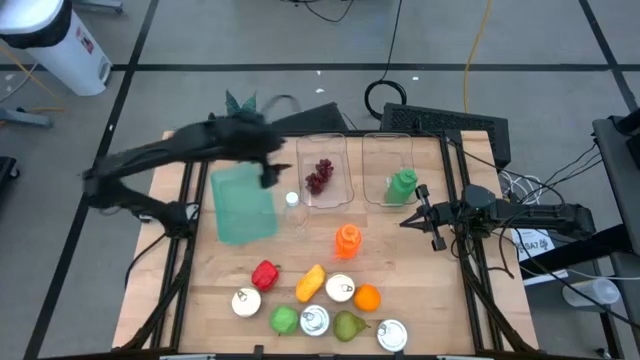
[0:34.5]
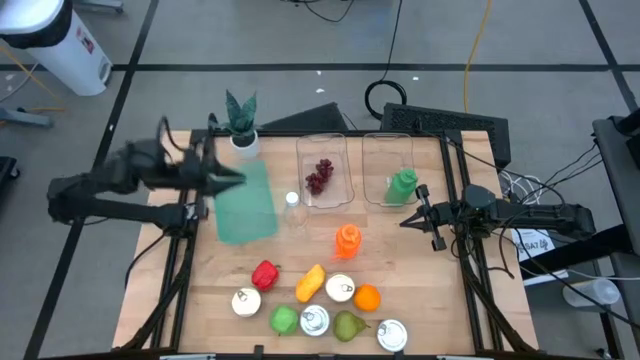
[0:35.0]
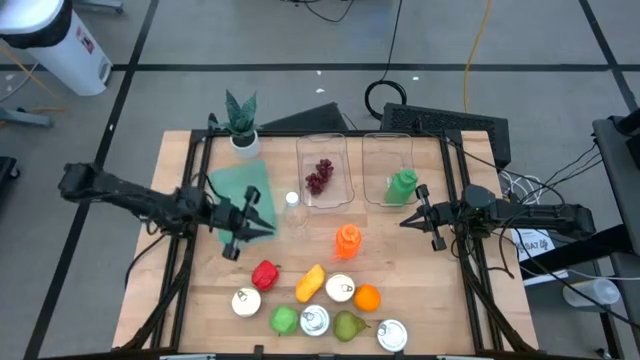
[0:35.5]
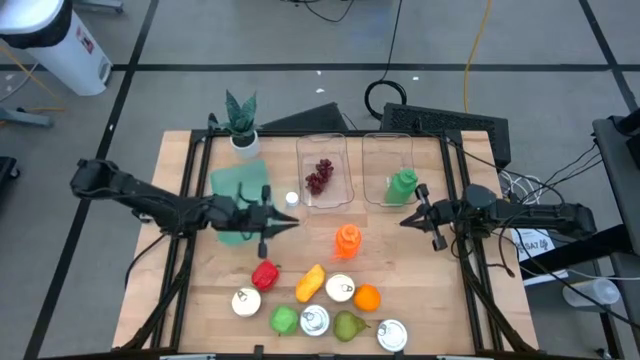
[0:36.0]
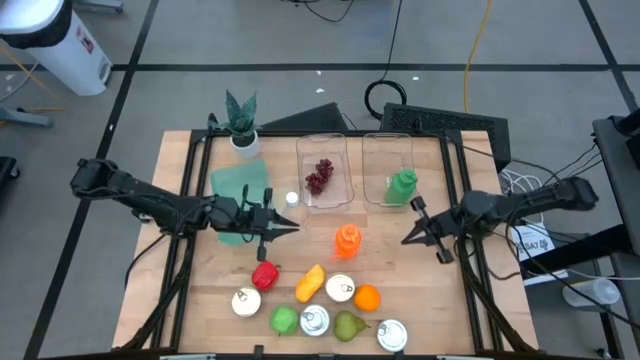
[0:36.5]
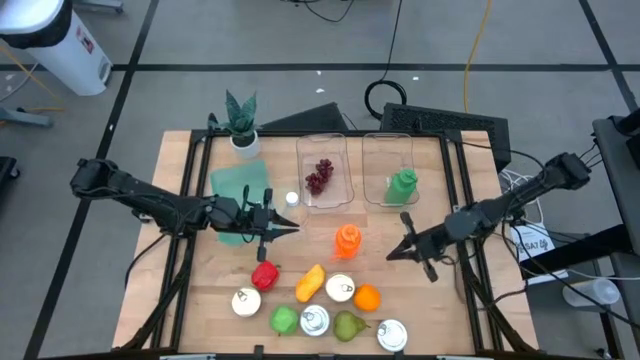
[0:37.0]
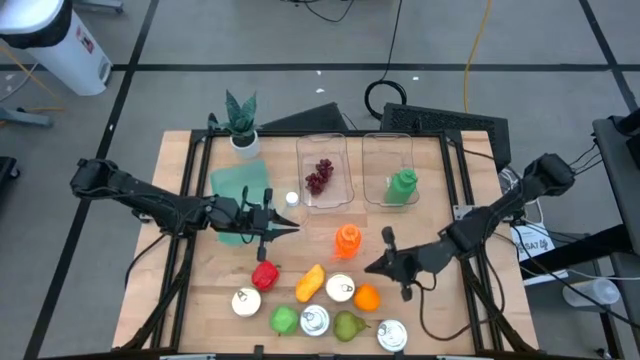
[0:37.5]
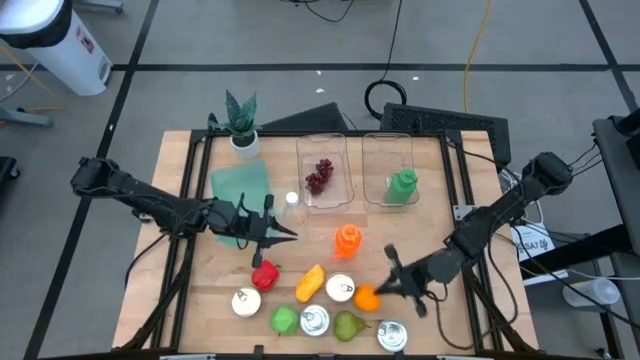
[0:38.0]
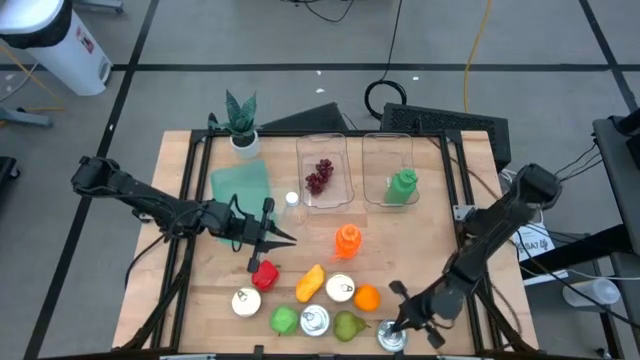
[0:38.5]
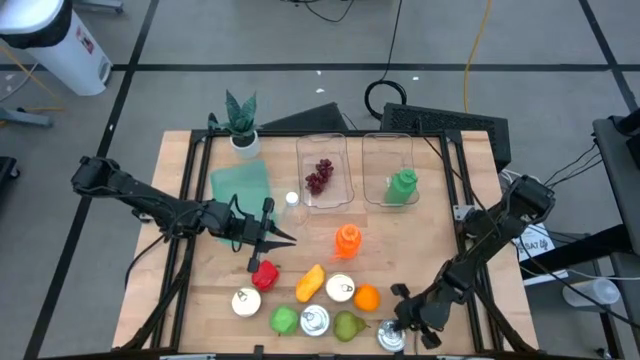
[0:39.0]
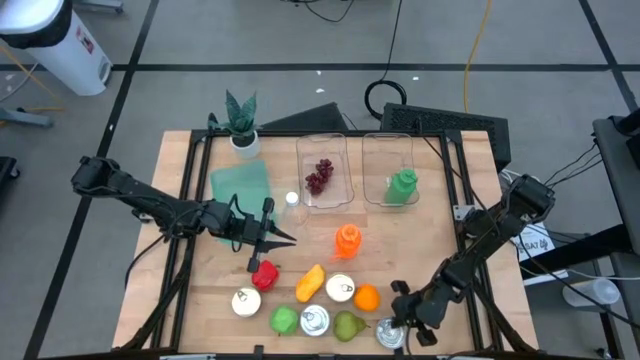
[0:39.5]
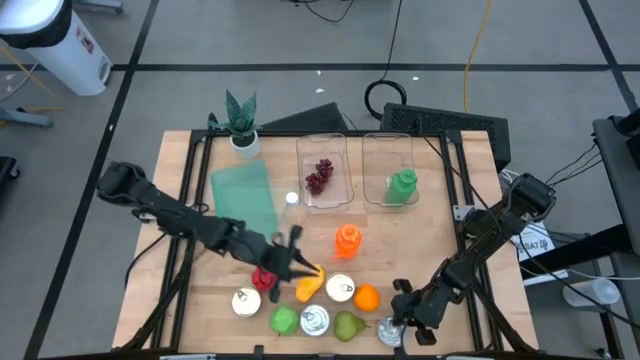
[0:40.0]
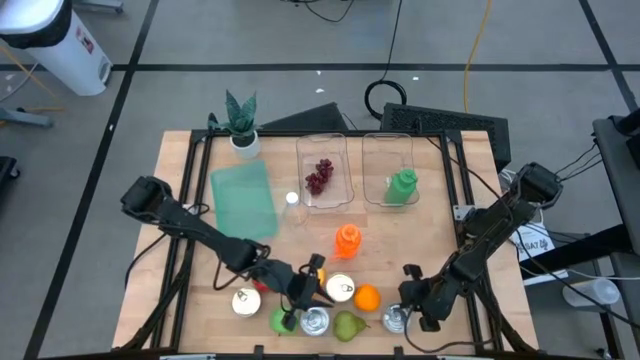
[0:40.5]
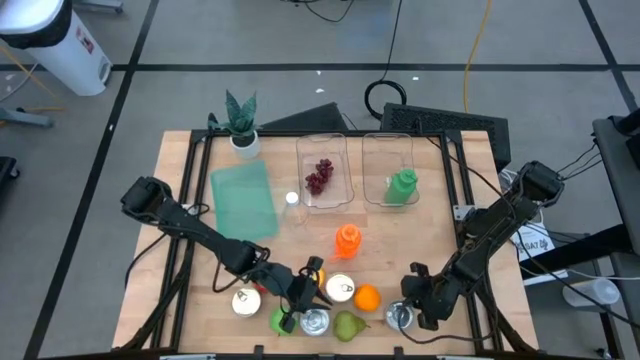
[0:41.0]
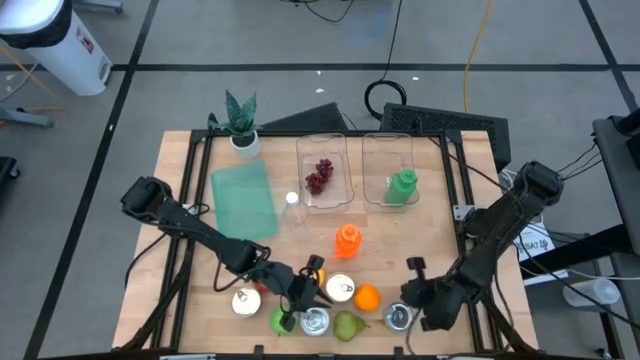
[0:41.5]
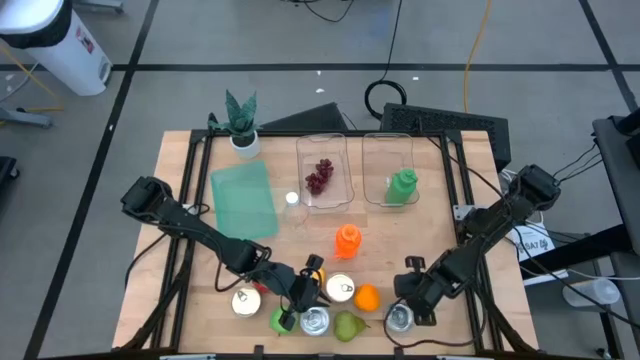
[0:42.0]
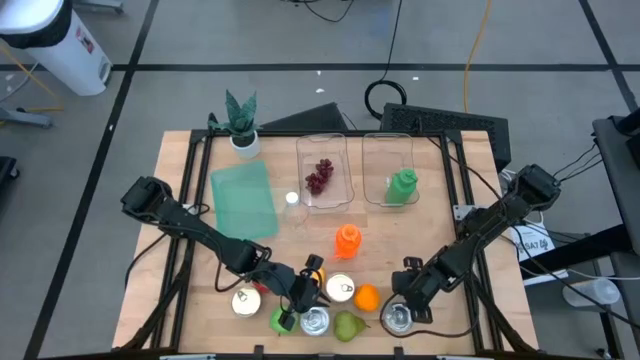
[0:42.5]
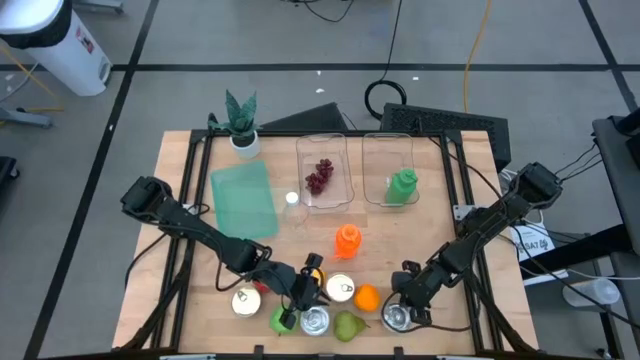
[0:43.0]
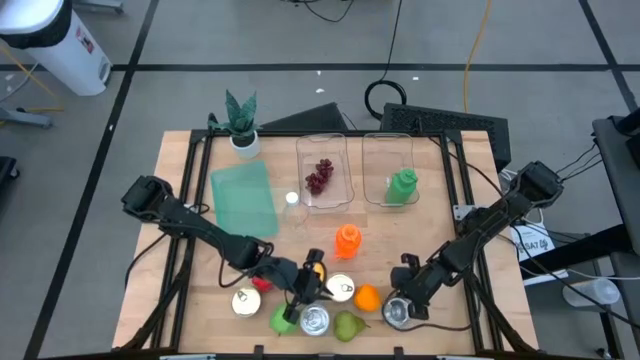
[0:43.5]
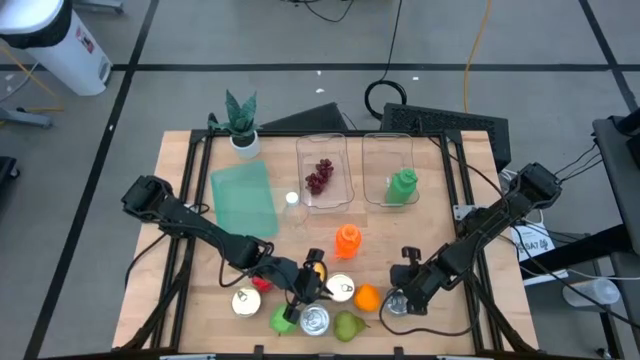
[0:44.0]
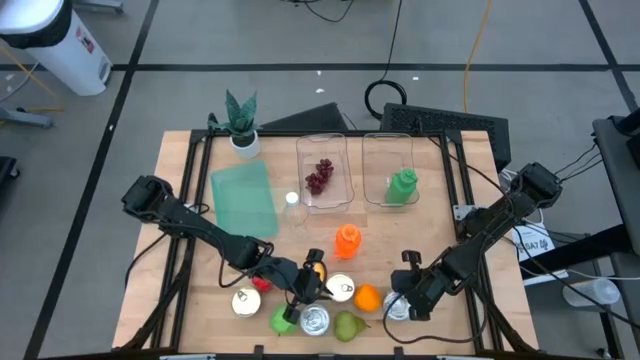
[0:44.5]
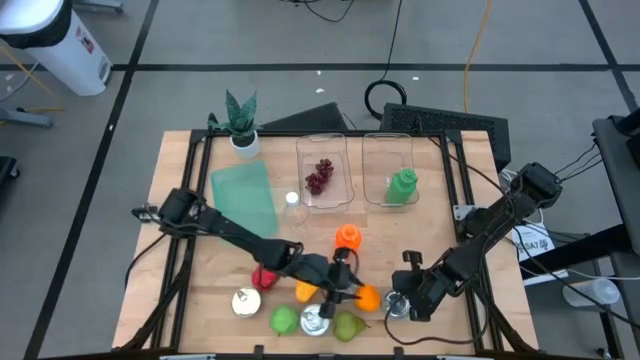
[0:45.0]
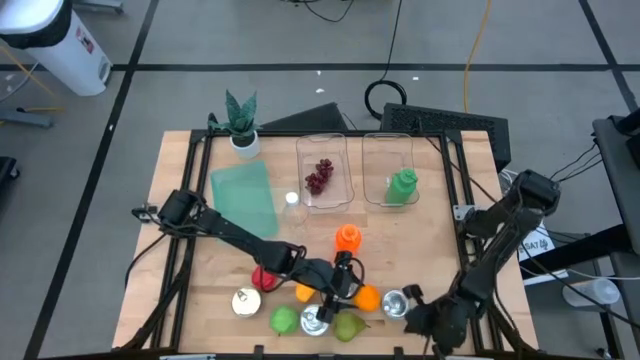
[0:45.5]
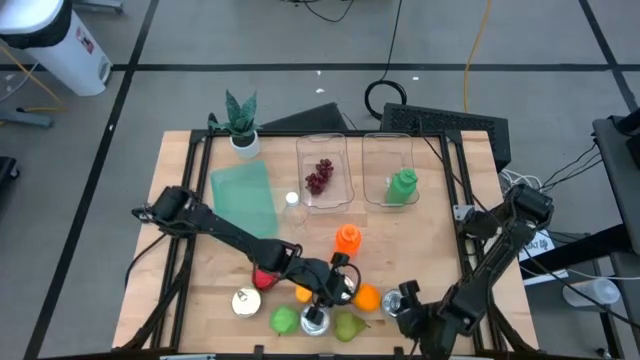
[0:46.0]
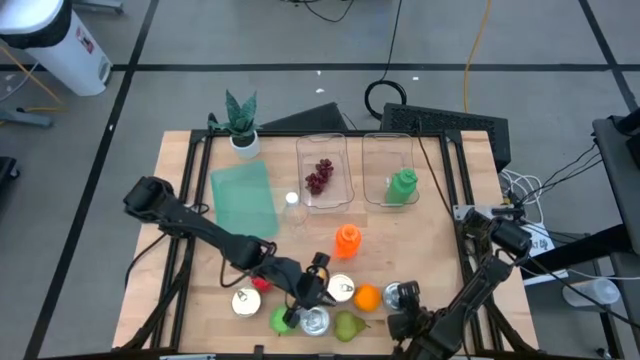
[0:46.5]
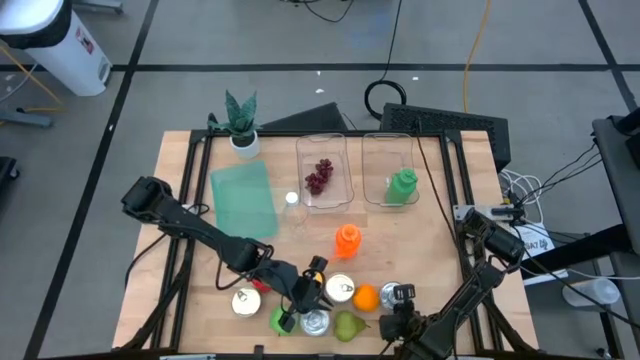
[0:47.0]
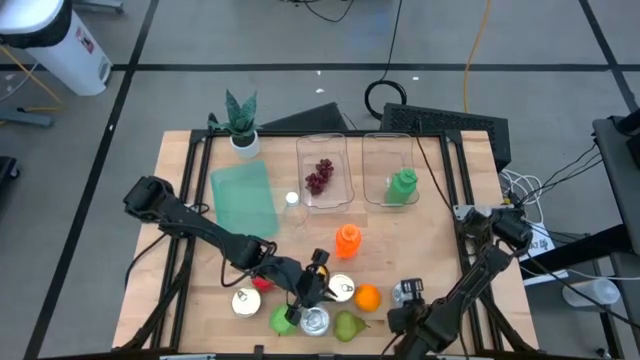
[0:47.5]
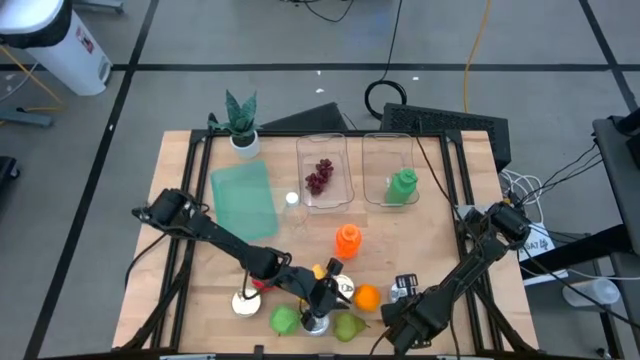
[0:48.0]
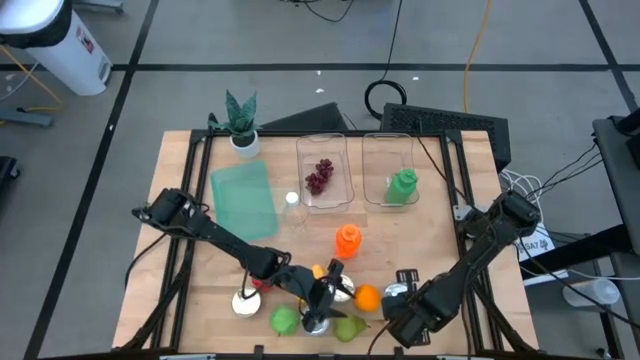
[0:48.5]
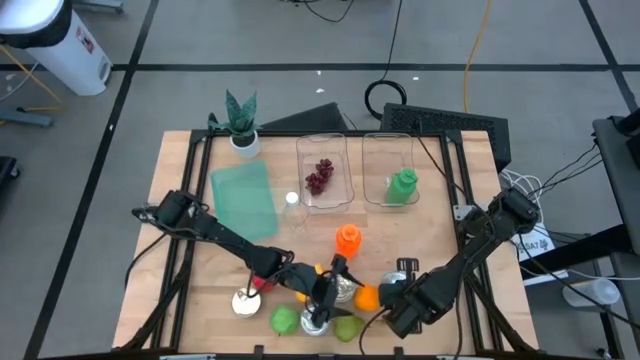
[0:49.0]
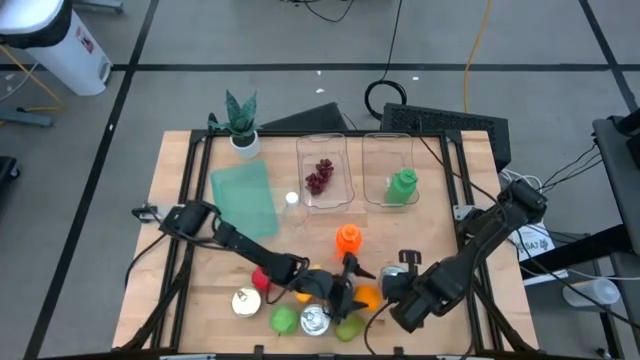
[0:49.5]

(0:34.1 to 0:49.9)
Task: Pick & Place Food Item
Put the right green tuna can into the blue bin

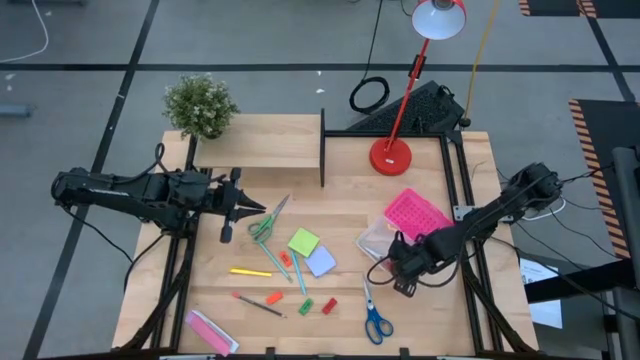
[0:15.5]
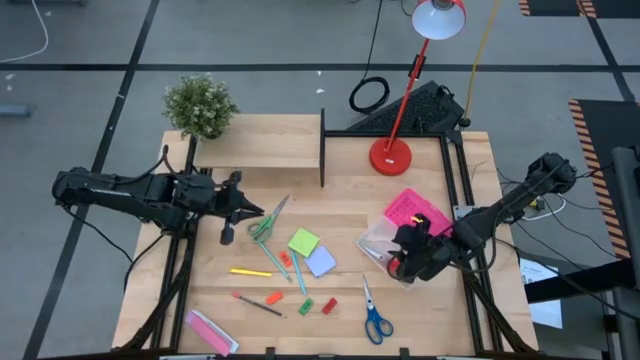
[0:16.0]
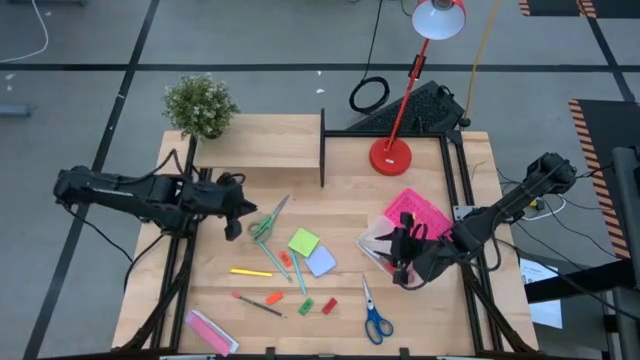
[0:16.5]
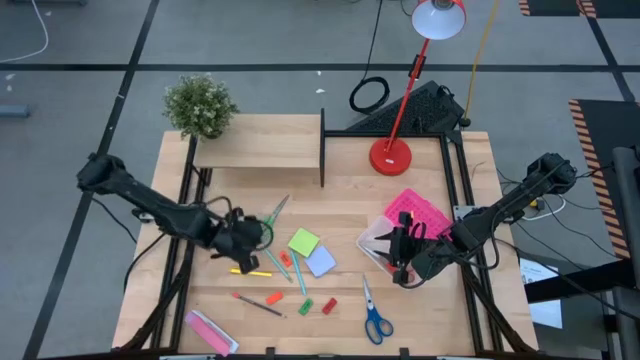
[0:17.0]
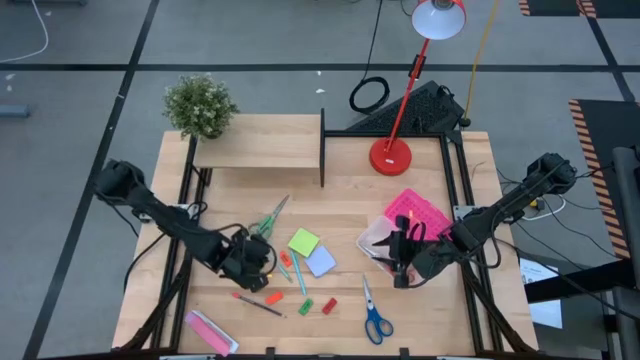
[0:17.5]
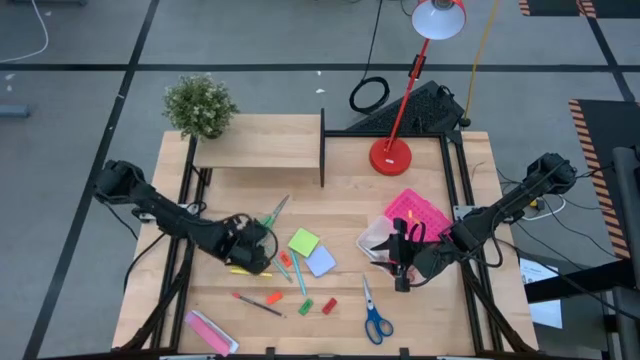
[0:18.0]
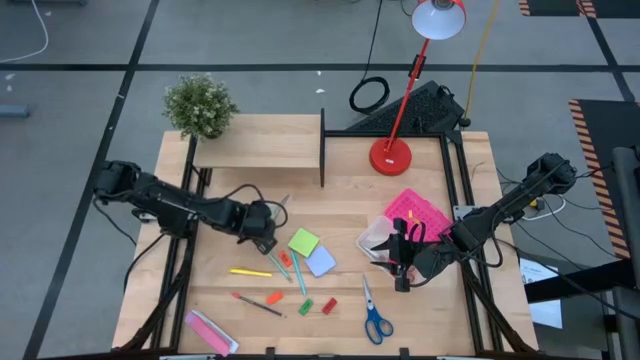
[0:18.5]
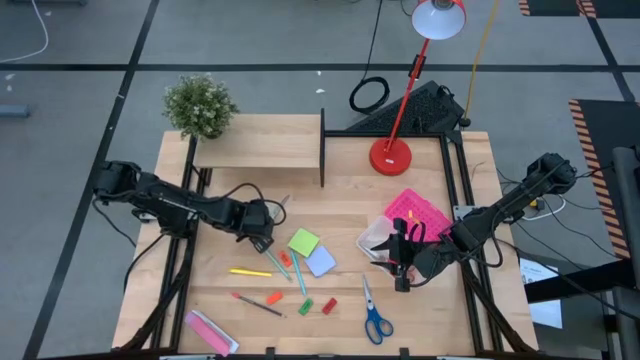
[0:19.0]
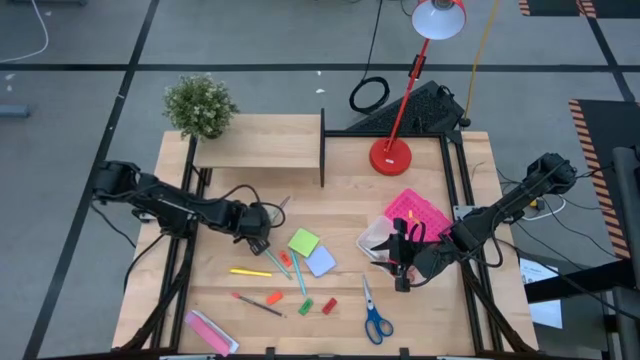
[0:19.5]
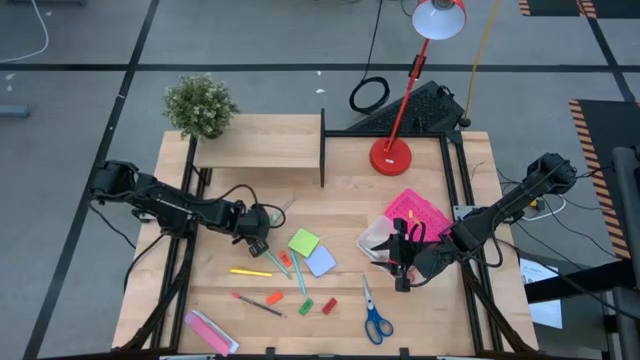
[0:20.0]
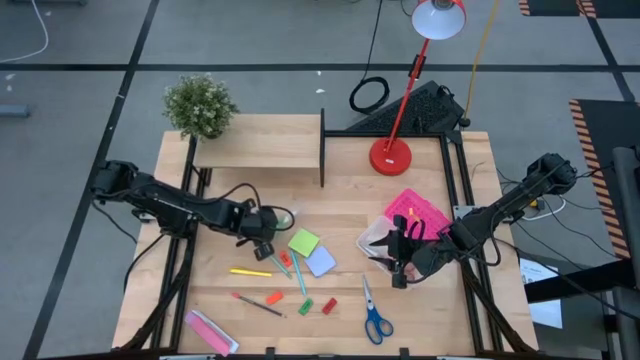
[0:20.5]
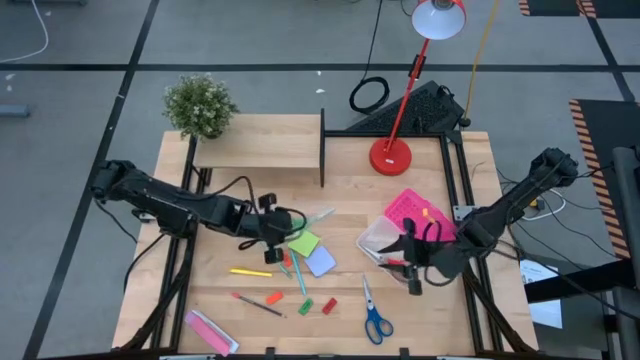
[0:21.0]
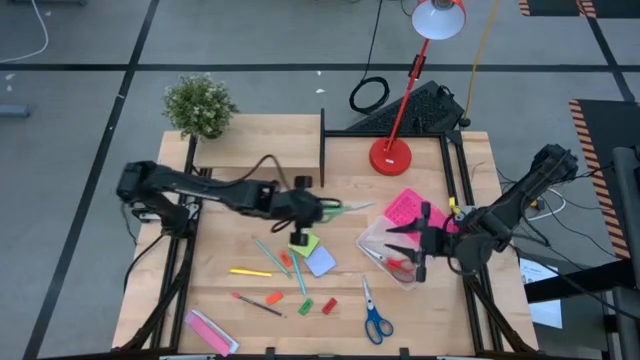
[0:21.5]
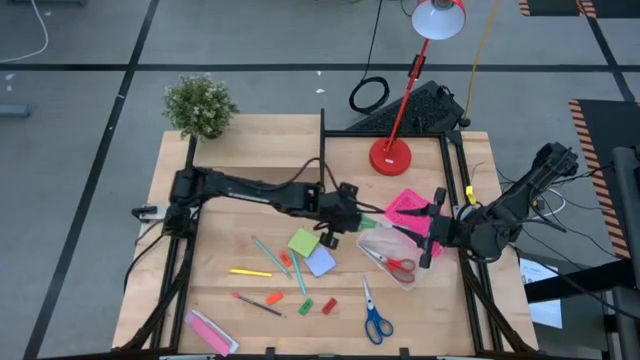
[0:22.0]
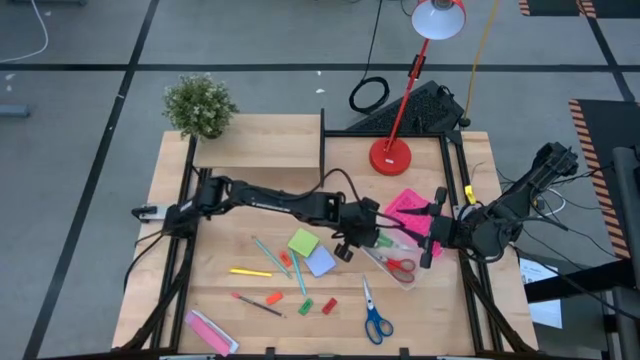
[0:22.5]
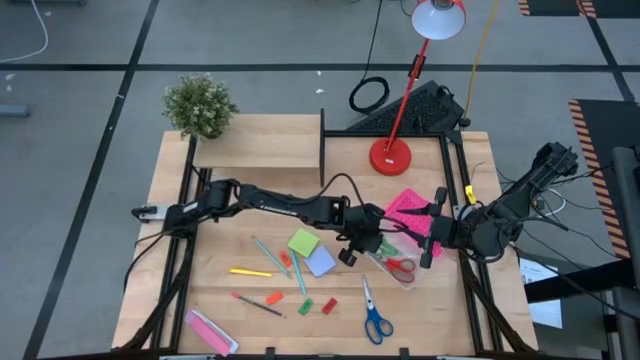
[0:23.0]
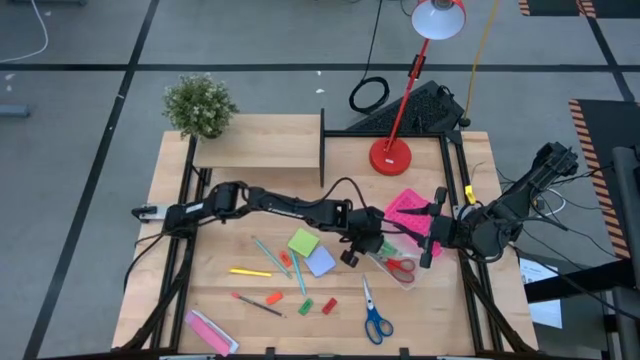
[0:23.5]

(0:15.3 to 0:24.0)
Task: Pack school essentials
Put the green scissors into the pink supply box
